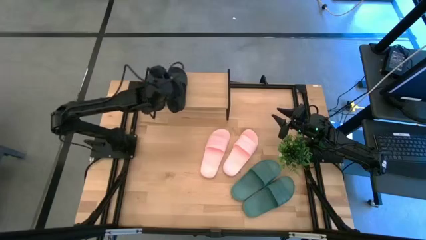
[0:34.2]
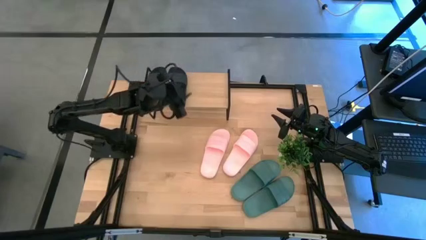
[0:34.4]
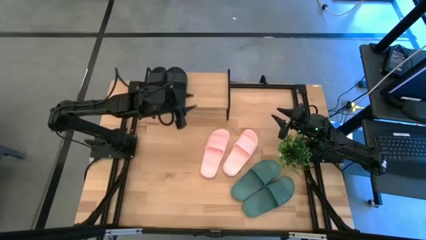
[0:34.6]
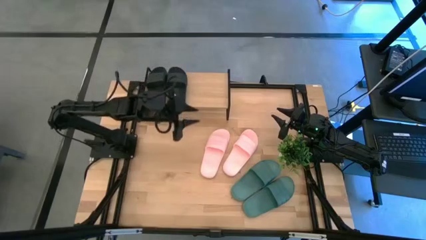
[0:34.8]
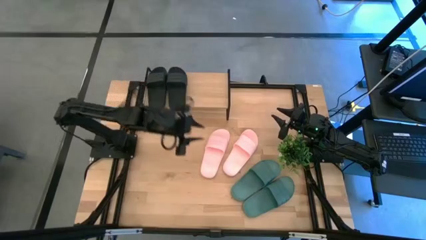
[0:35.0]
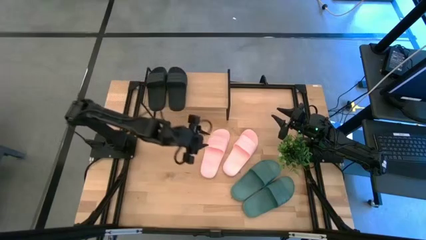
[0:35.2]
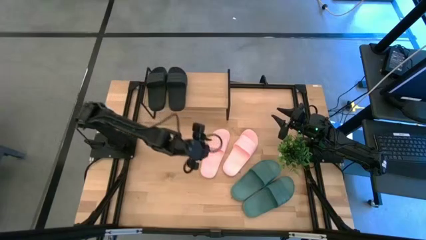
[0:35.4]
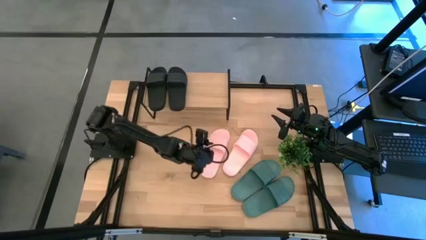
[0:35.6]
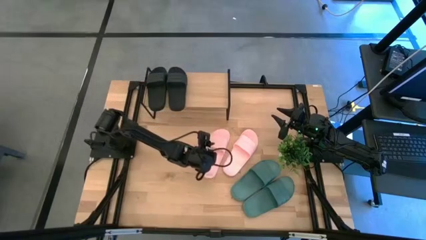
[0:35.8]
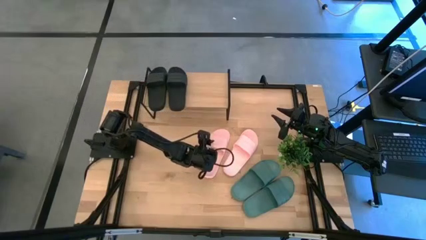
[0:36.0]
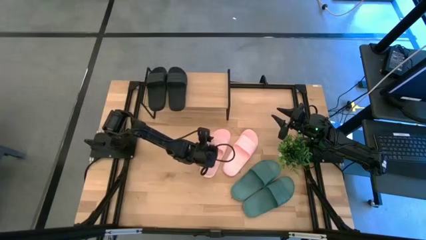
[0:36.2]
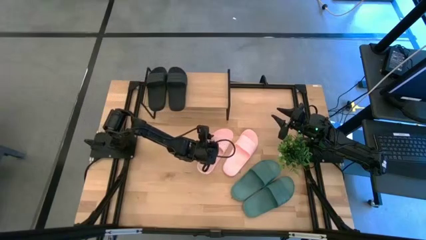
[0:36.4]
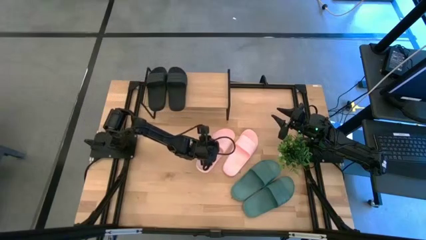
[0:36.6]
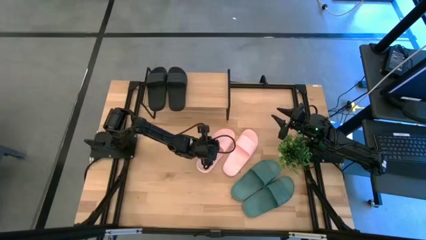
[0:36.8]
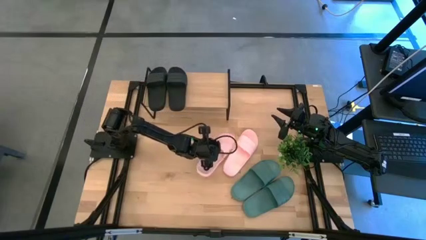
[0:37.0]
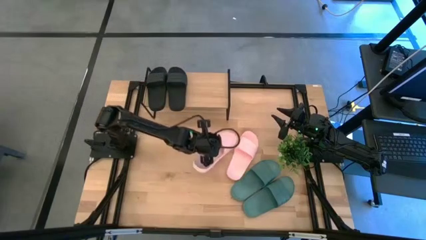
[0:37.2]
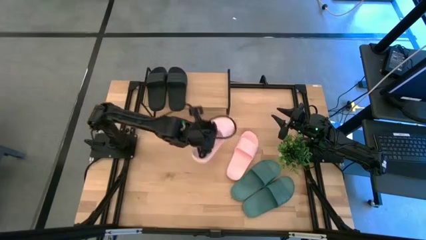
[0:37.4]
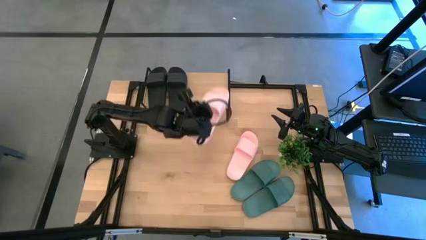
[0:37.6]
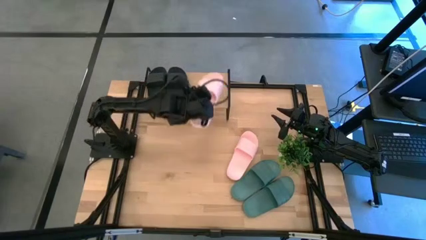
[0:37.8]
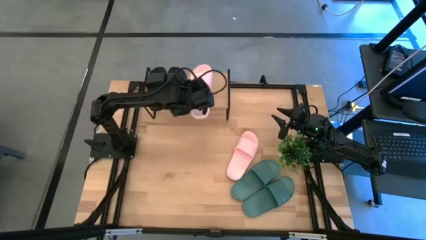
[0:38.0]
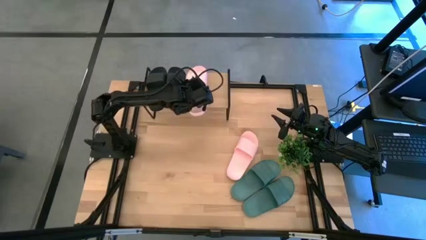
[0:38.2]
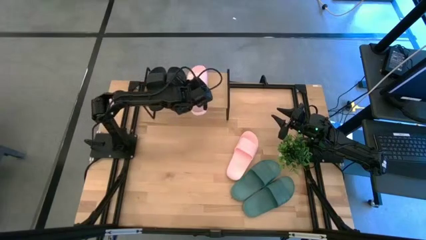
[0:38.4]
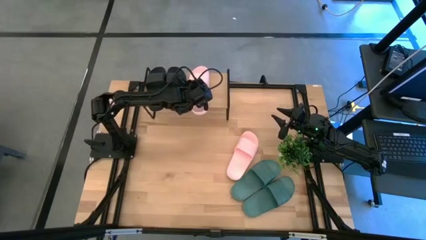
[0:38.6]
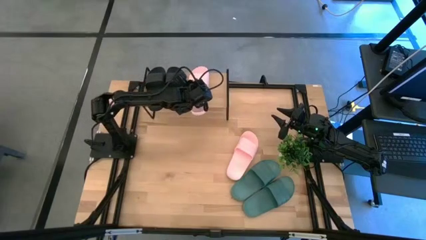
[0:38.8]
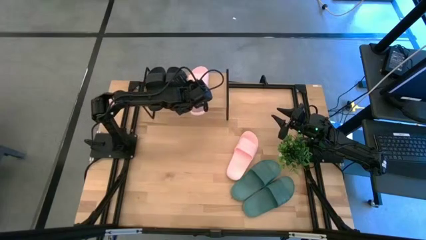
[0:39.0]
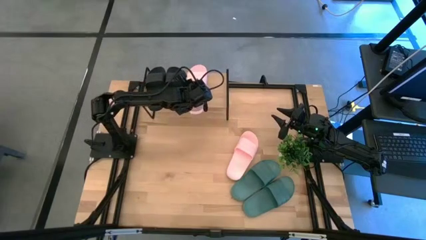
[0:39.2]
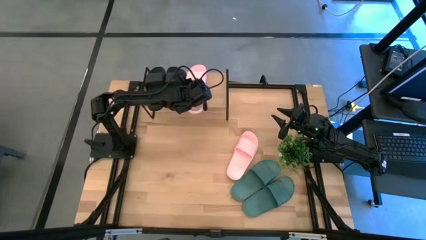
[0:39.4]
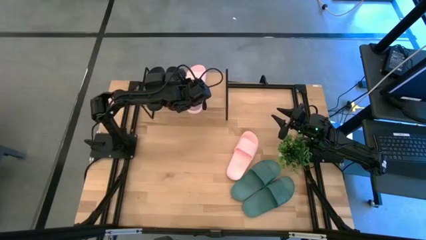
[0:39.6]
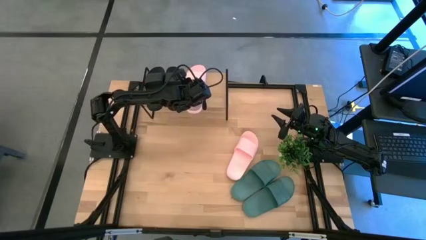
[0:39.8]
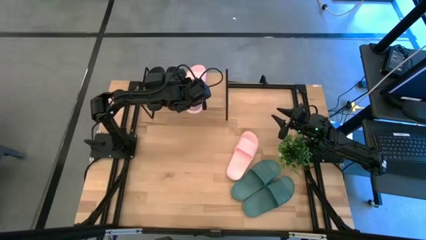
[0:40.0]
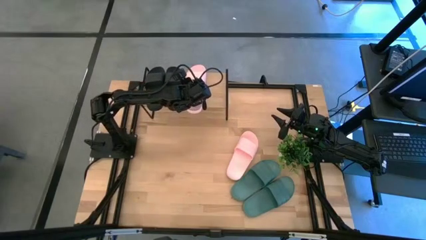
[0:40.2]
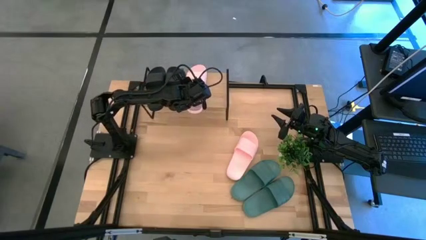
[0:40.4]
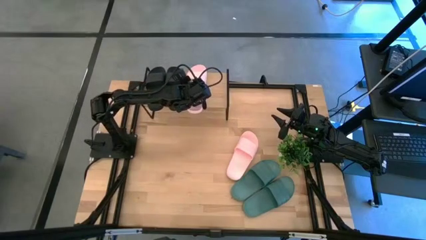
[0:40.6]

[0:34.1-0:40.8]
Task: Pick and place slides into the shelf
Put the left pink slide on the shelf

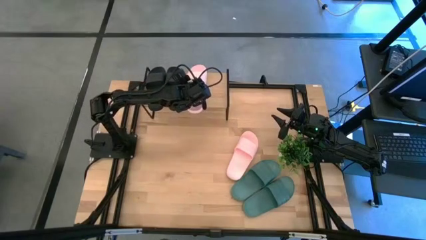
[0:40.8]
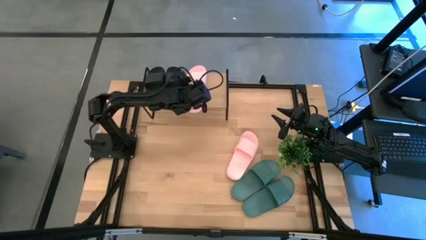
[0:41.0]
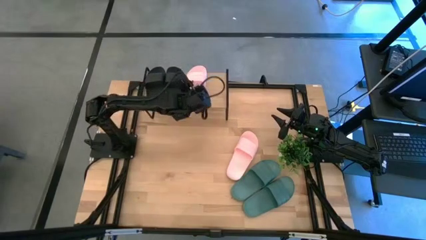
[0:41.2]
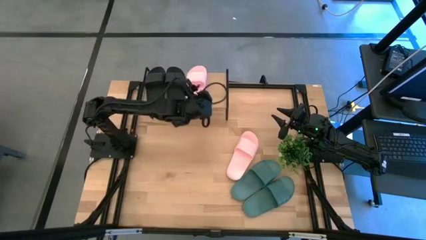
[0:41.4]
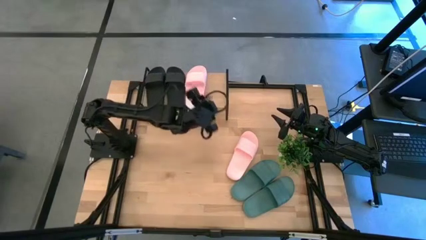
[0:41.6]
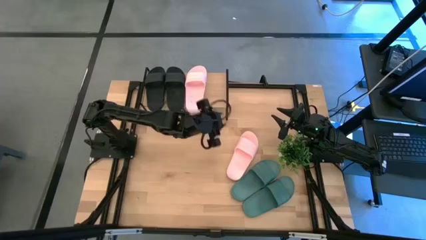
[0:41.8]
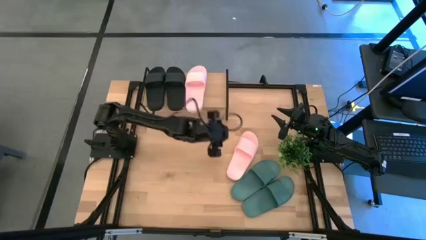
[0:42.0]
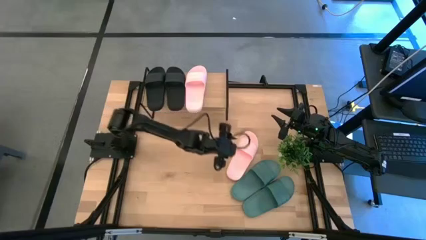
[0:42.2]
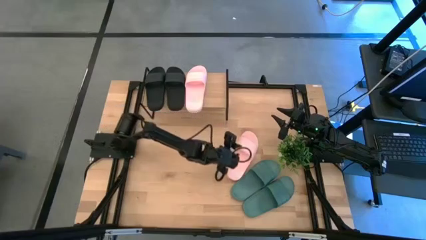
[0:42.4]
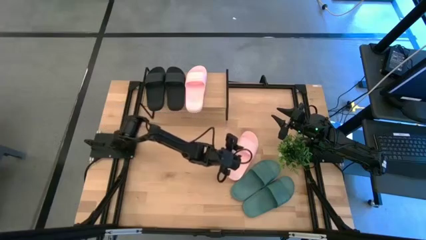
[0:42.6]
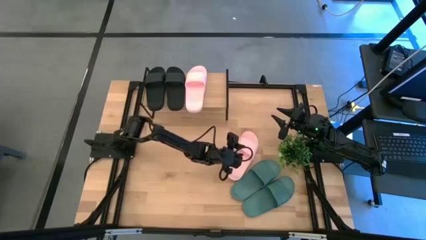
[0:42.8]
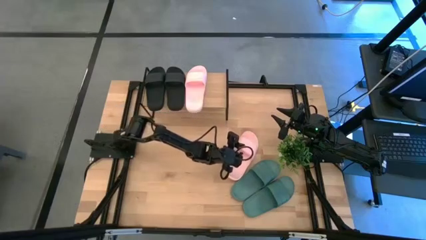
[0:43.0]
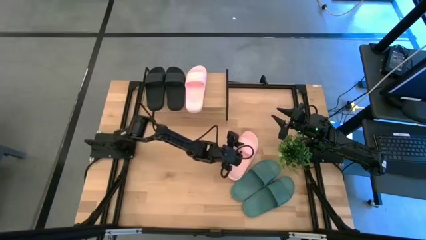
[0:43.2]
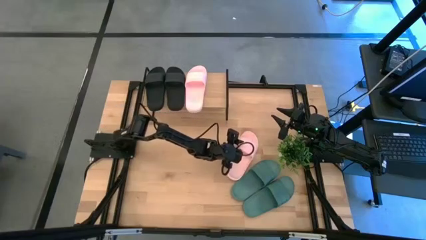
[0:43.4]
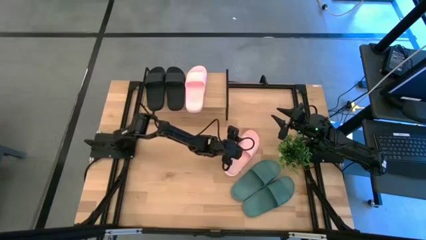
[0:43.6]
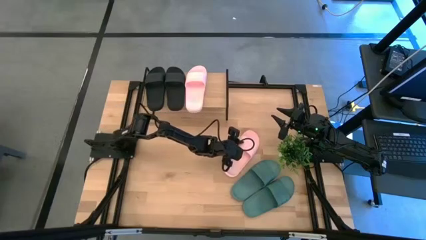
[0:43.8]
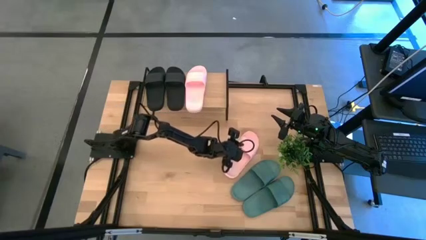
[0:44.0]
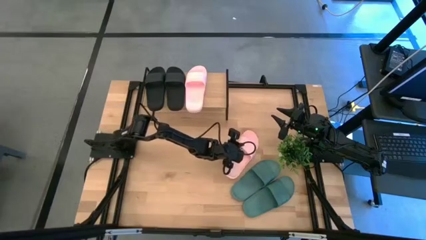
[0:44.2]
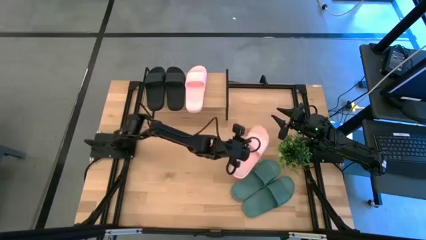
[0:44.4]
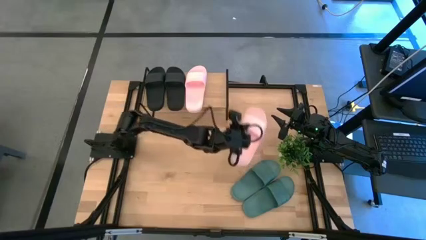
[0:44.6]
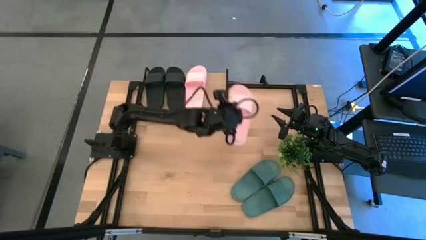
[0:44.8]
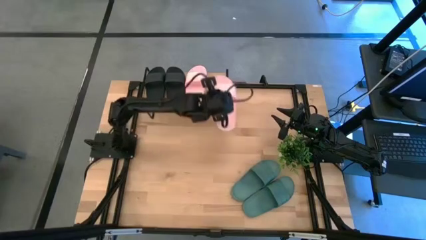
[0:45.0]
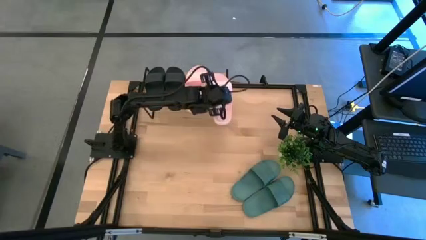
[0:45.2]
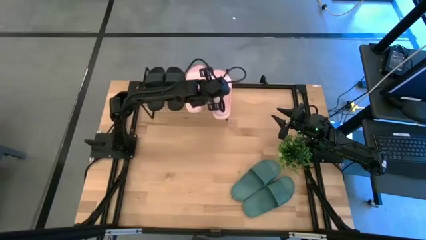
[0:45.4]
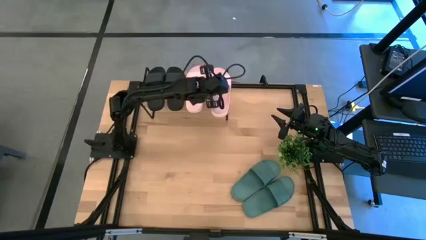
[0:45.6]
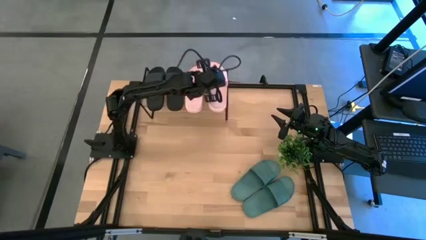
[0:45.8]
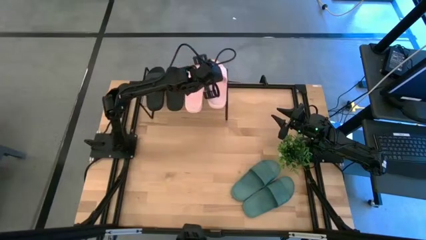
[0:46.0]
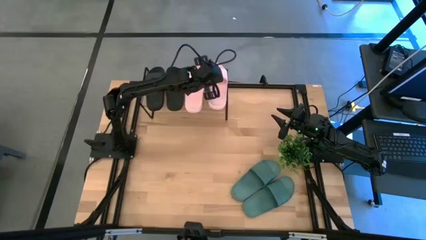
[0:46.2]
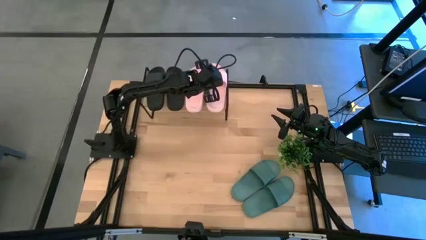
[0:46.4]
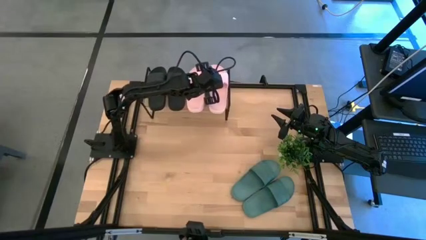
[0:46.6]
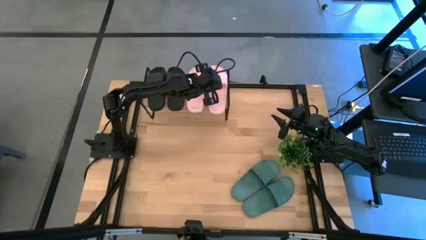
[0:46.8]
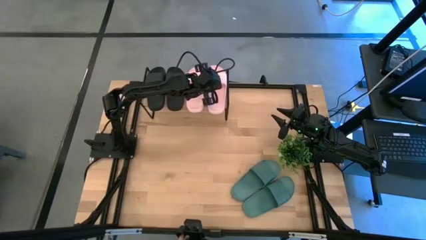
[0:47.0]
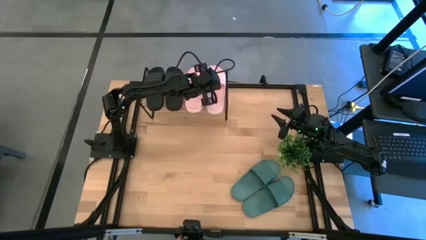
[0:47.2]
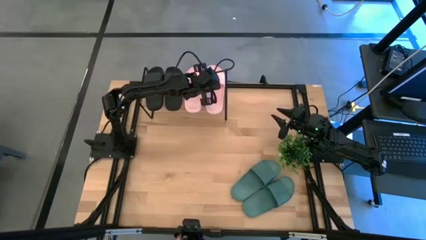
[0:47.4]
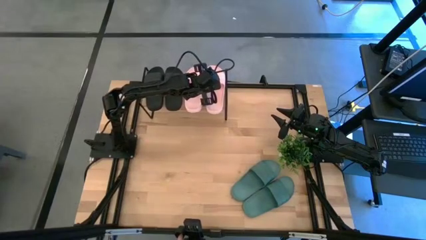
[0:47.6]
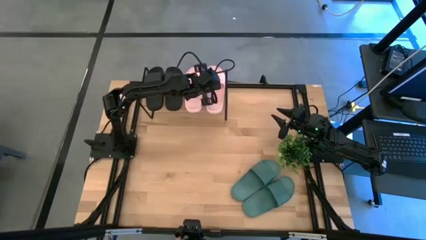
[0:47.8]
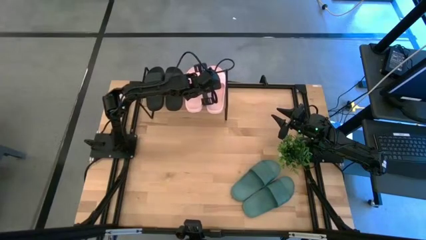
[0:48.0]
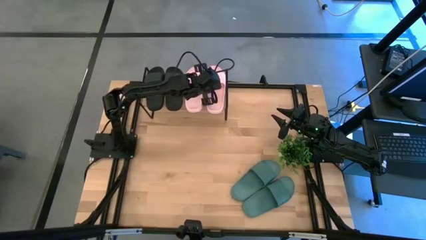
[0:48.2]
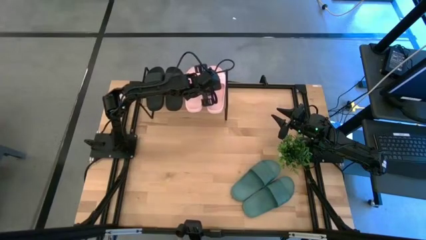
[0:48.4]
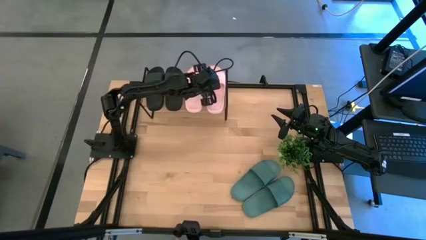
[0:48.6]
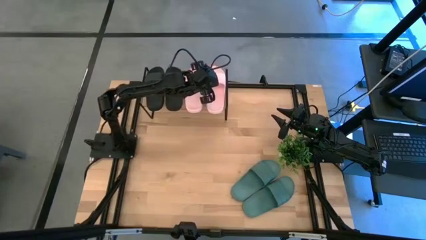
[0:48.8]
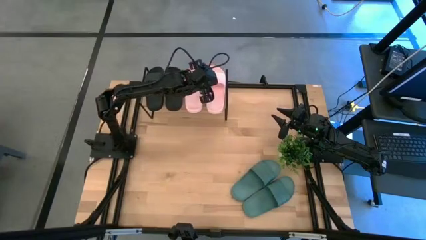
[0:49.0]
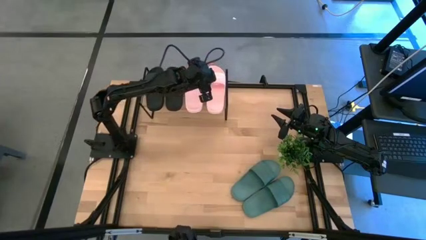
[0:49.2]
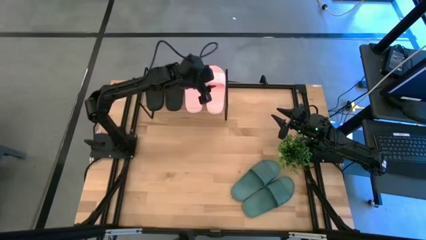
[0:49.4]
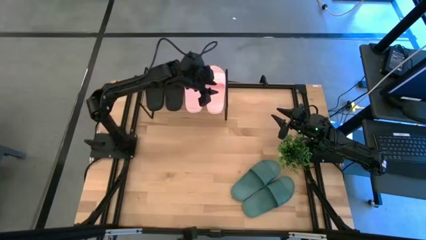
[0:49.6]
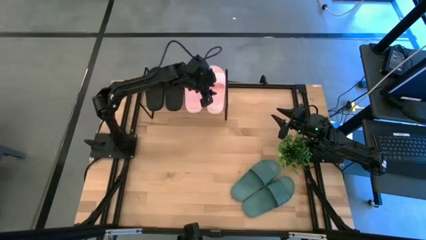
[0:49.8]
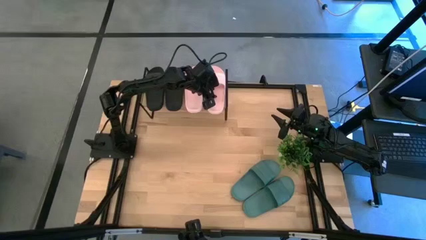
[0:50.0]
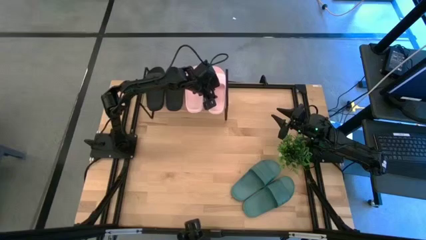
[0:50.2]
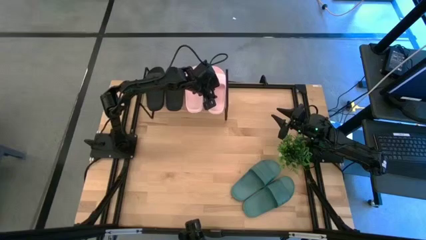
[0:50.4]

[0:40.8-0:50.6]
Put the pink slide on the shelf
